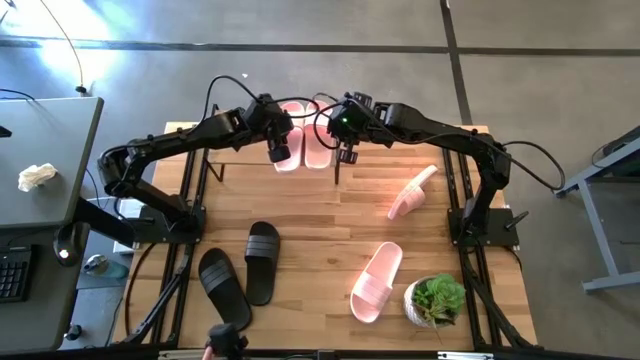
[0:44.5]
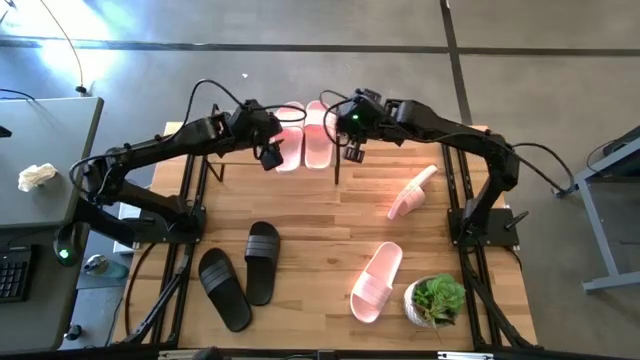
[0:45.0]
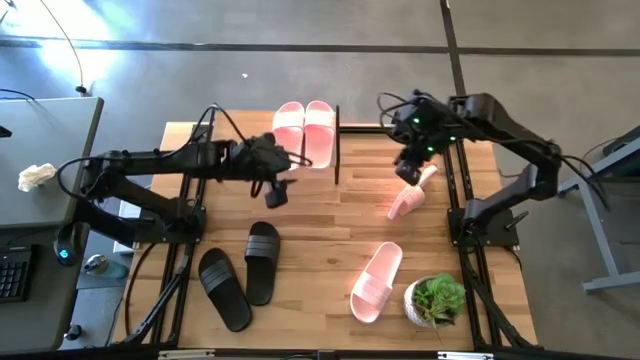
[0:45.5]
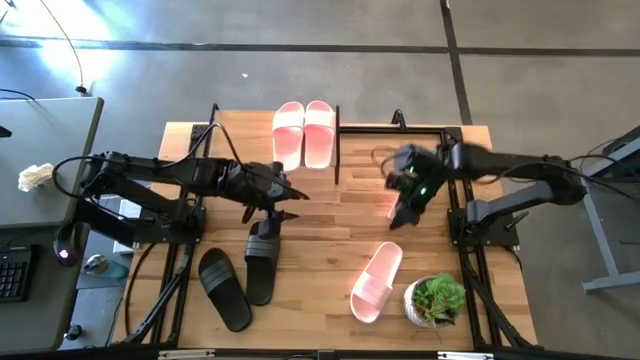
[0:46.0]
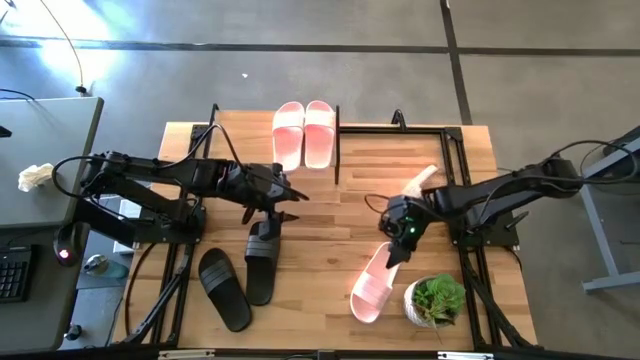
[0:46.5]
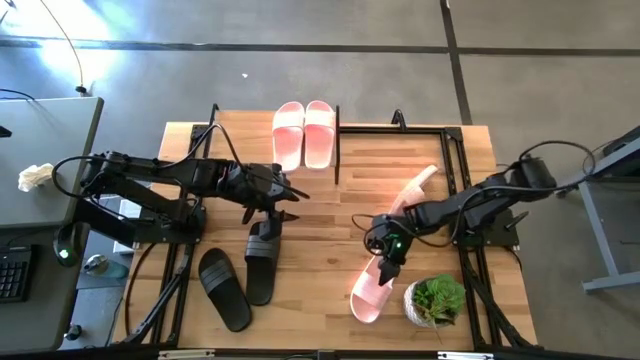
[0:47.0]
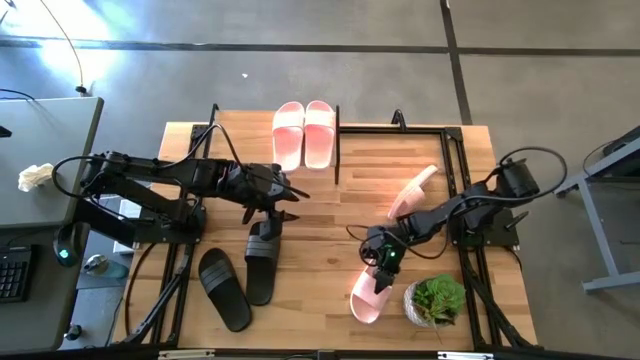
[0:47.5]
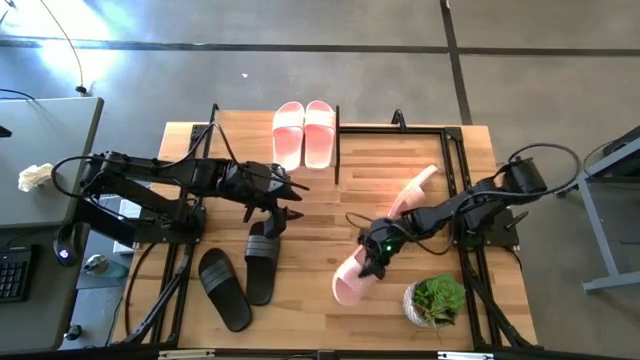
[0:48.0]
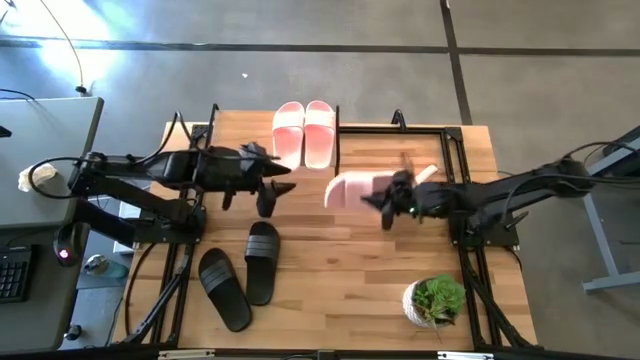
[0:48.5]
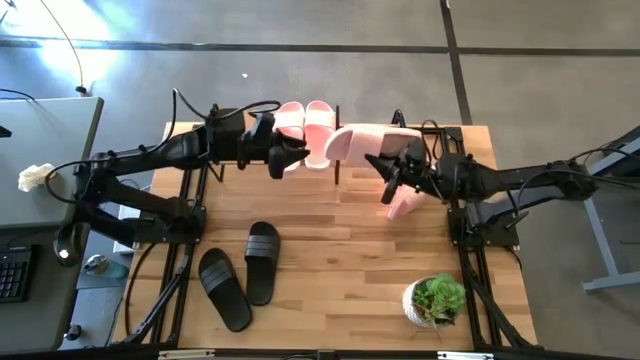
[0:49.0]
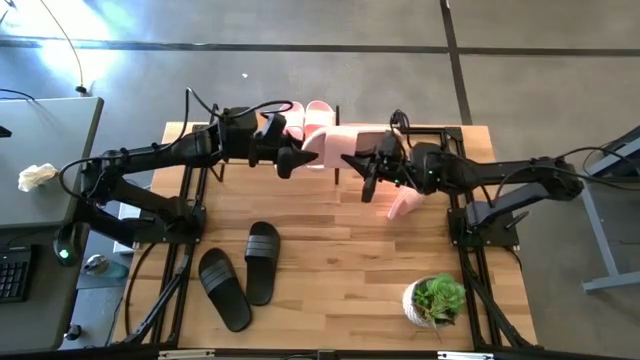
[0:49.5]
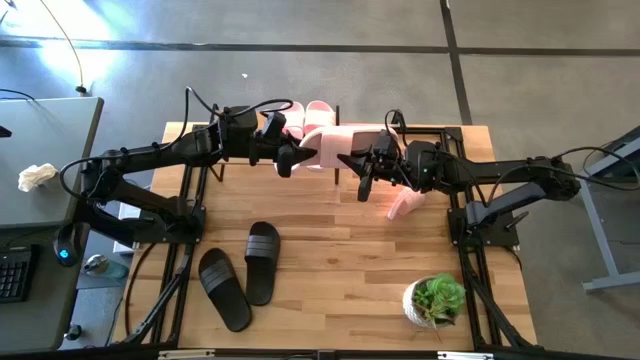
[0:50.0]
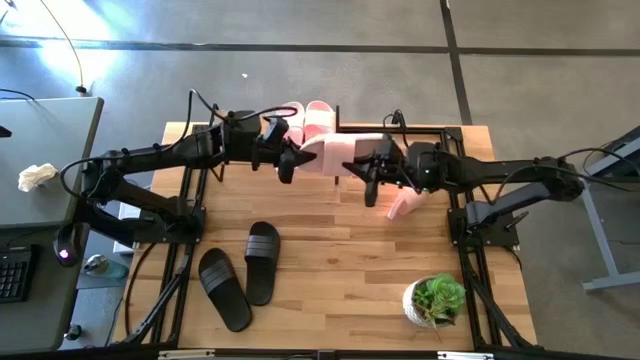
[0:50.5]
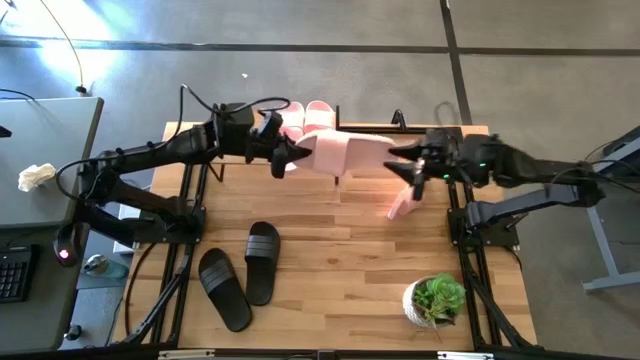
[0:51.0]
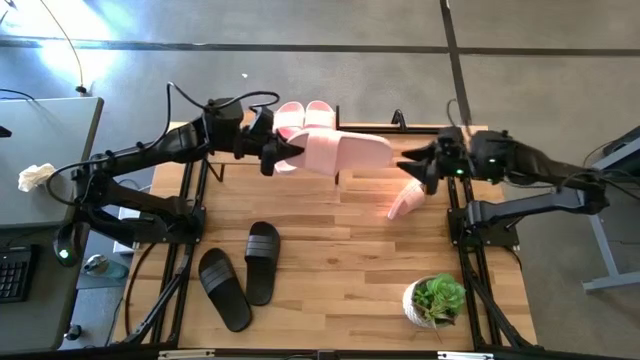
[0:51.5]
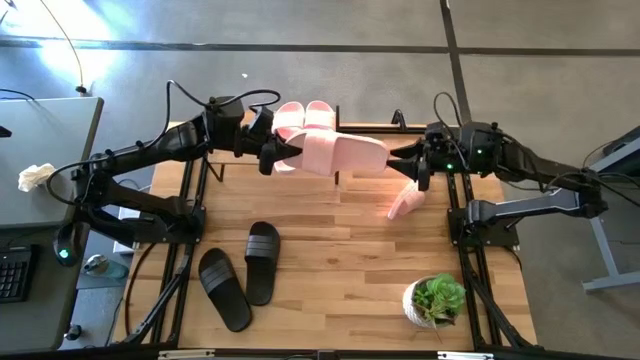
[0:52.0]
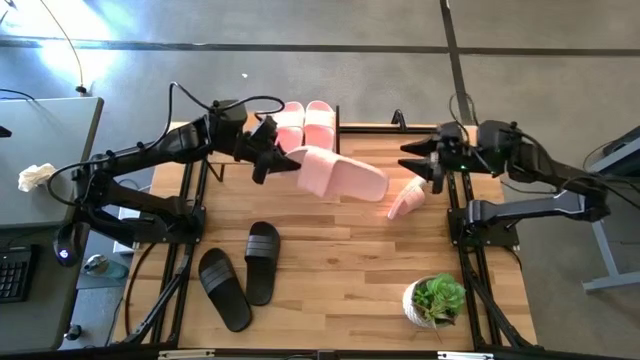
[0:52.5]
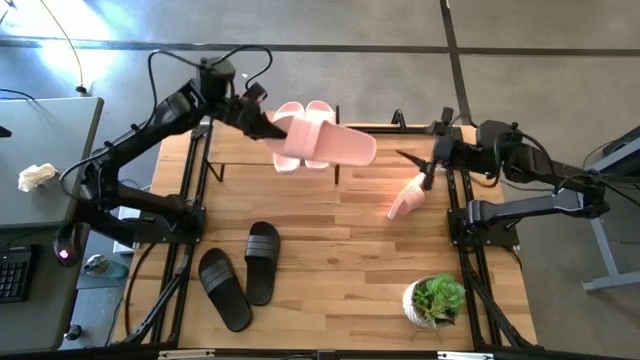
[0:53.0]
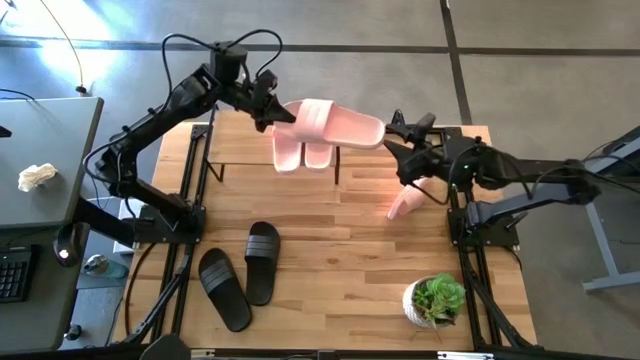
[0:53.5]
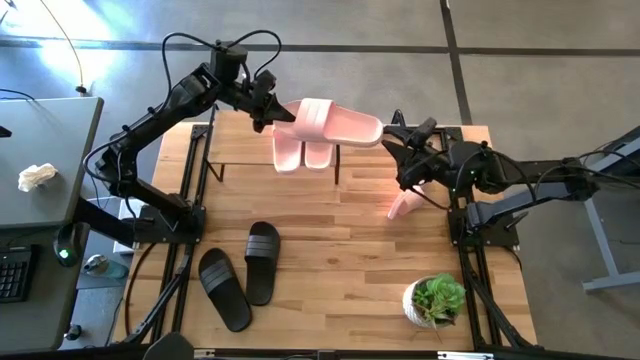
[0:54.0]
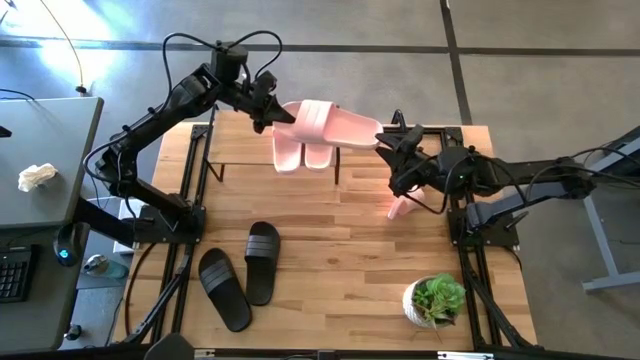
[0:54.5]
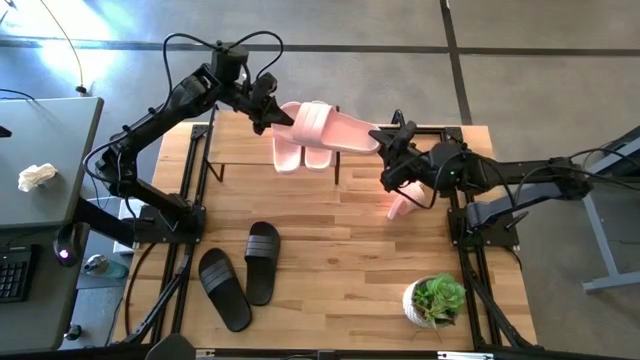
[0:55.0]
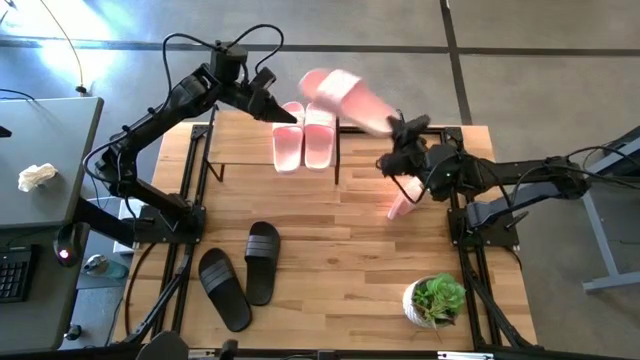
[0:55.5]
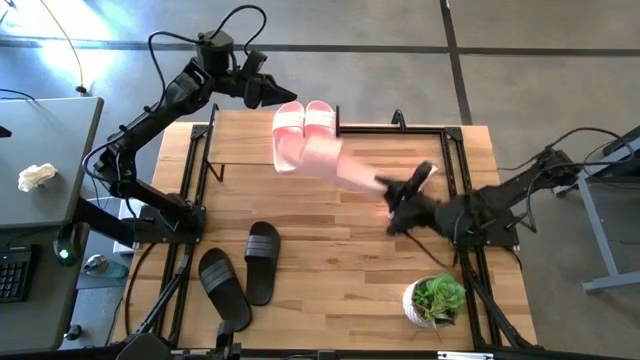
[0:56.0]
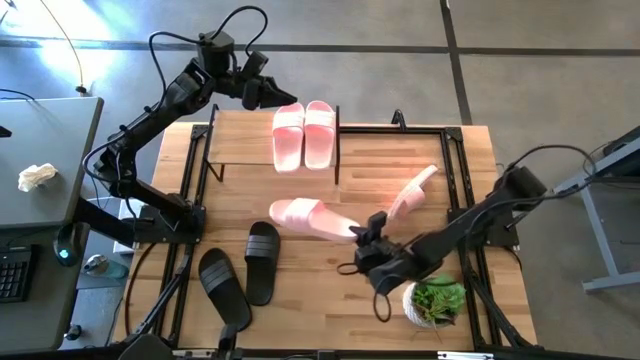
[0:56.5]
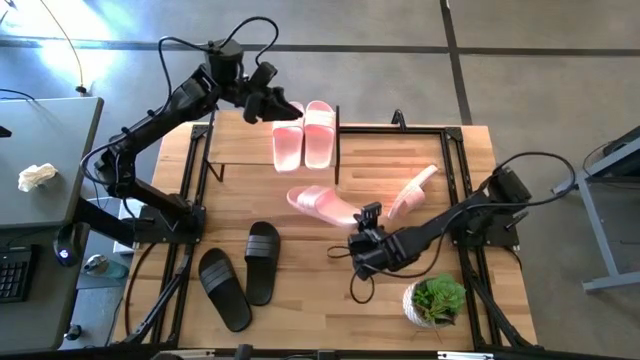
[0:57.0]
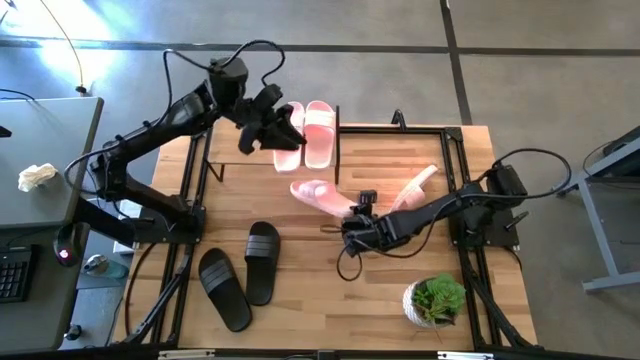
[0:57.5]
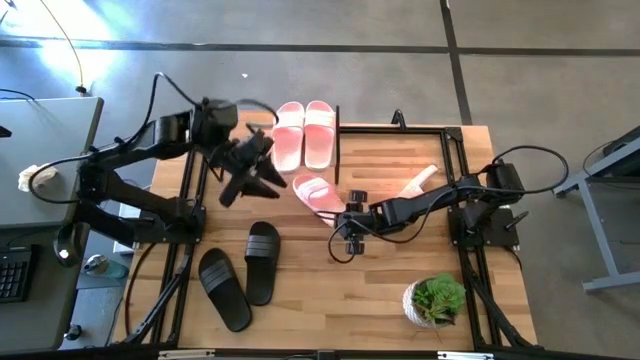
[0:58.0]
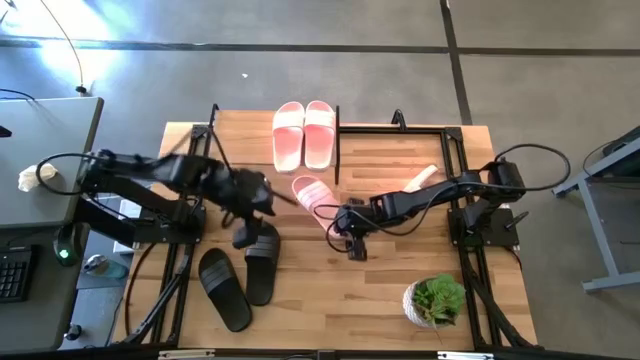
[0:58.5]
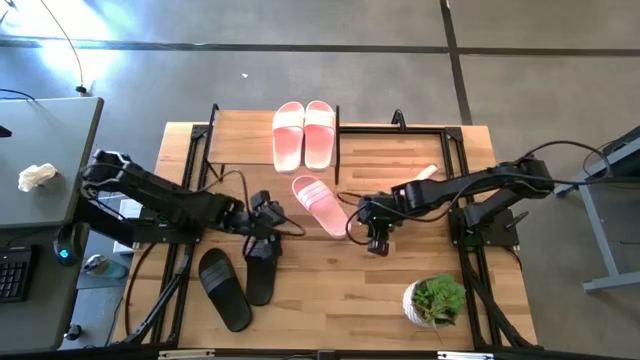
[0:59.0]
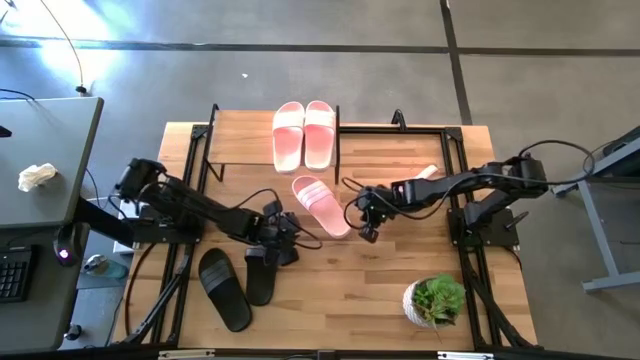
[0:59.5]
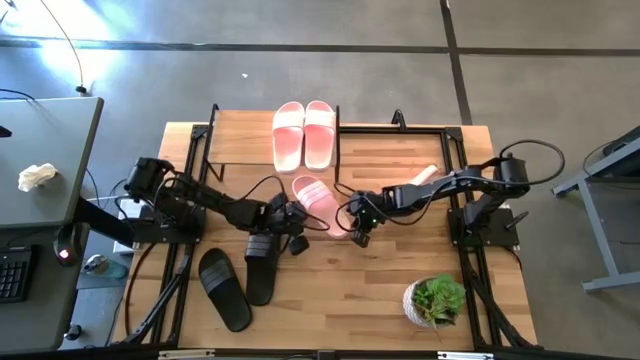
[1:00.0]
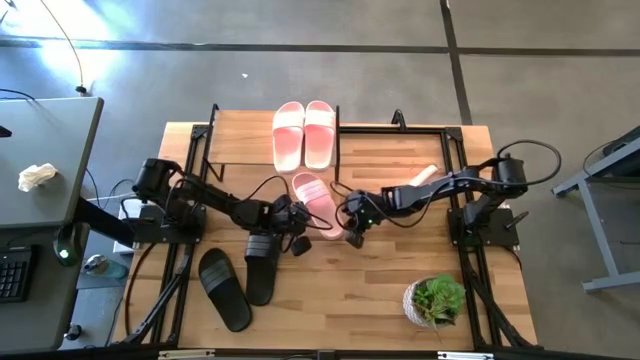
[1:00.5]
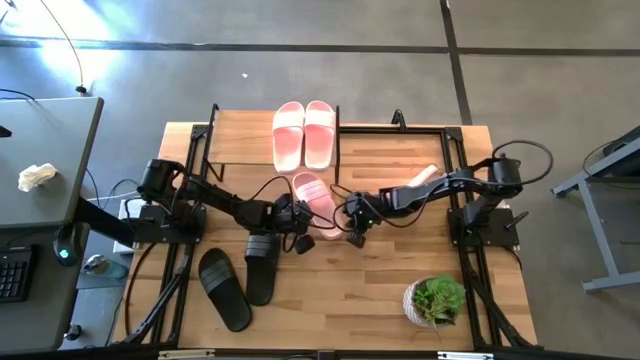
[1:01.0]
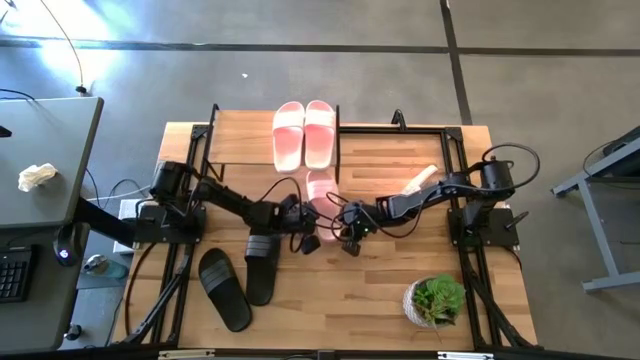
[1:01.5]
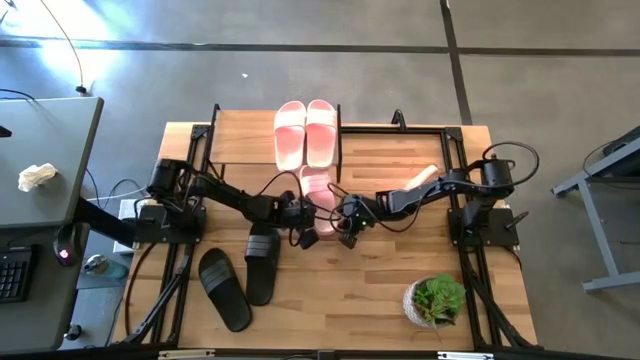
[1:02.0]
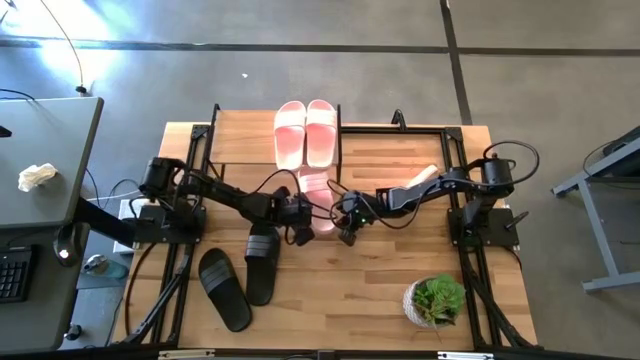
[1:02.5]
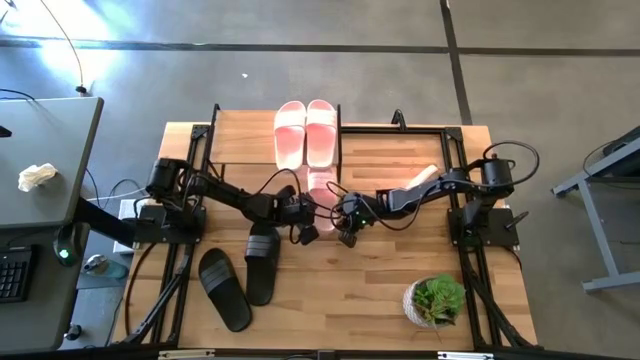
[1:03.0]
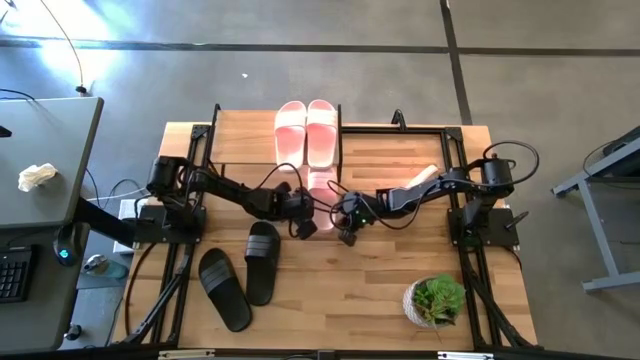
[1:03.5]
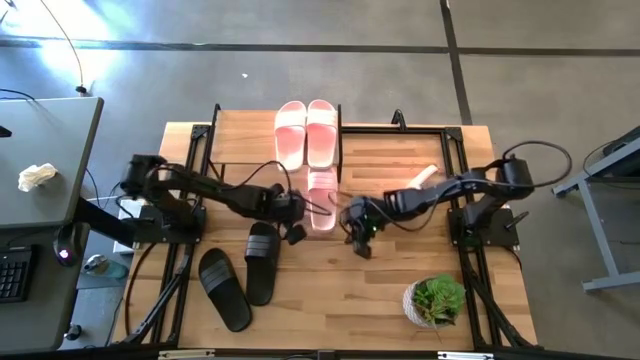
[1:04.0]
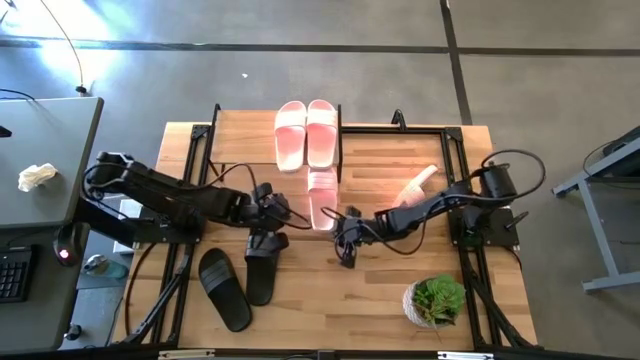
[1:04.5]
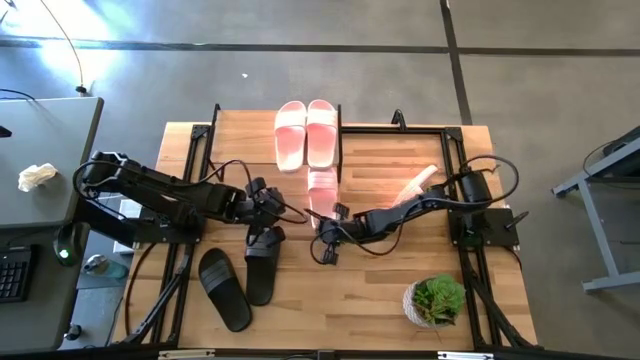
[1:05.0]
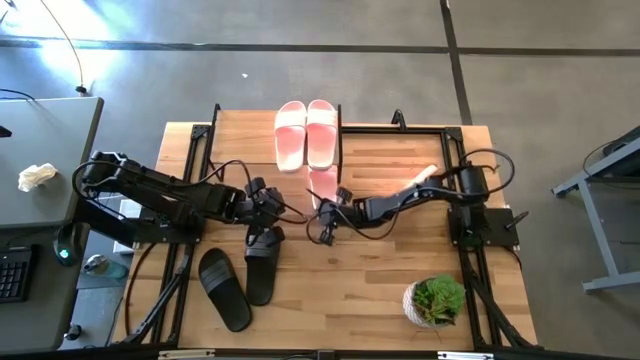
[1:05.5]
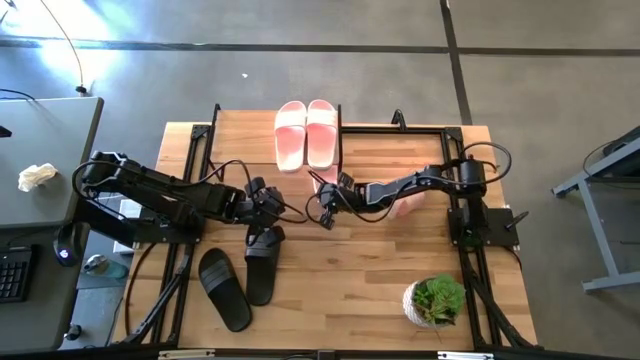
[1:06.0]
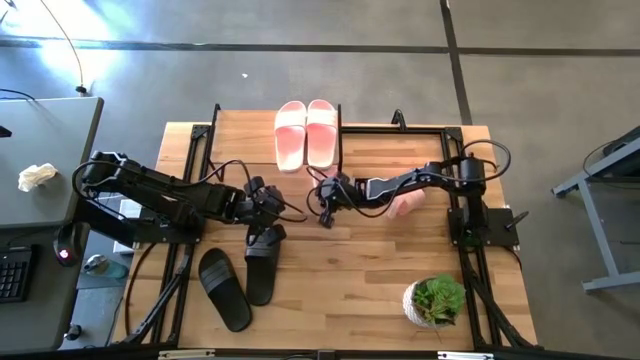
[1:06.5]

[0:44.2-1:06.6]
Task: Pick and place slides into the shelf
Put the pink slide under the shelf

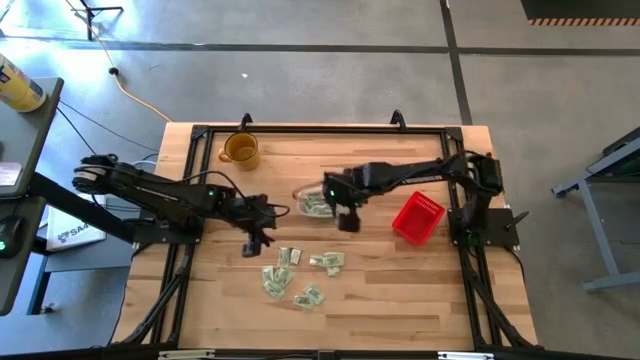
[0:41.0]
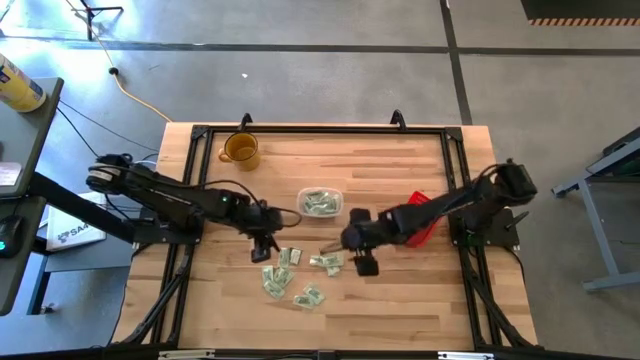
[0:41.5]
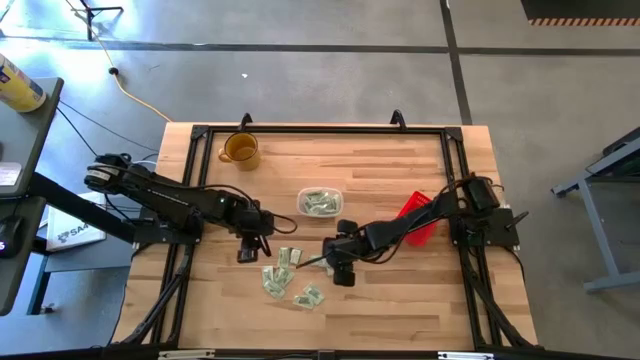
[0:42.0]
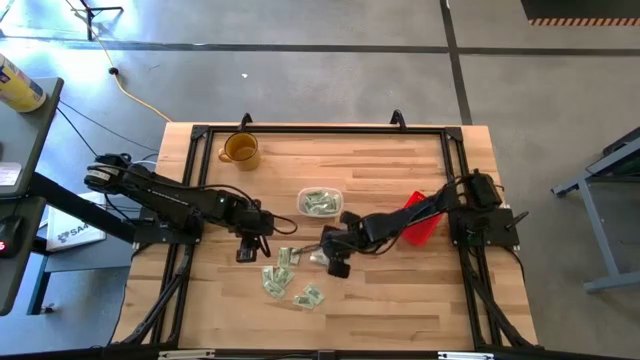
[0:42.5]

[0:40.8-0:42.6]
Task: Pick and place items into bin
Put the white stevia packet into the transparent bin
